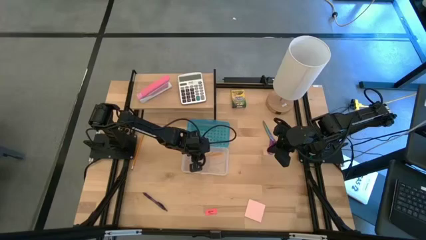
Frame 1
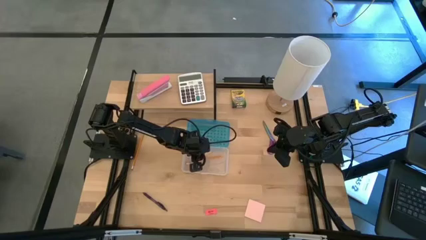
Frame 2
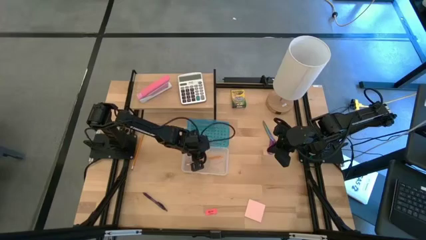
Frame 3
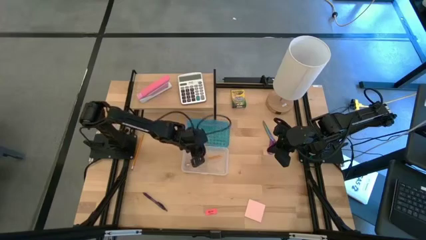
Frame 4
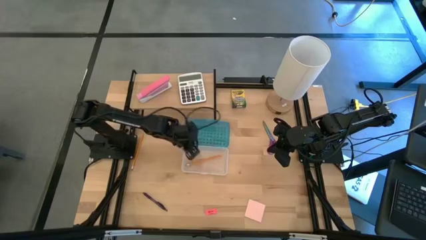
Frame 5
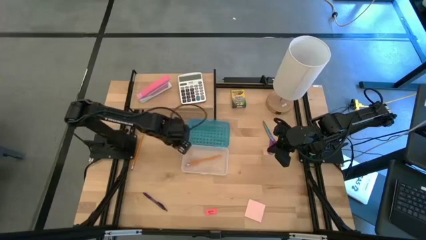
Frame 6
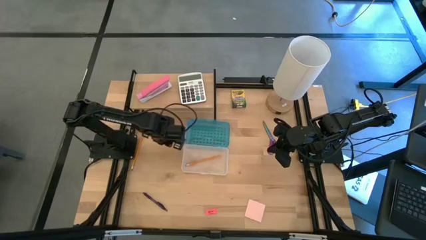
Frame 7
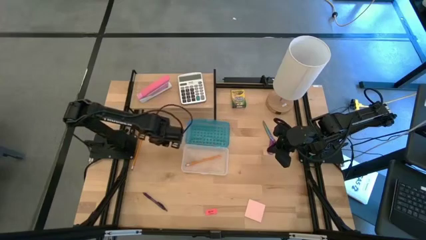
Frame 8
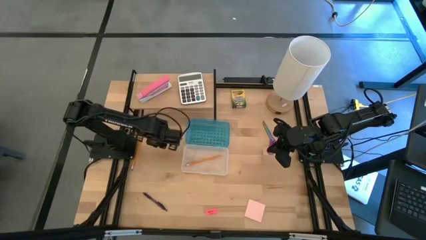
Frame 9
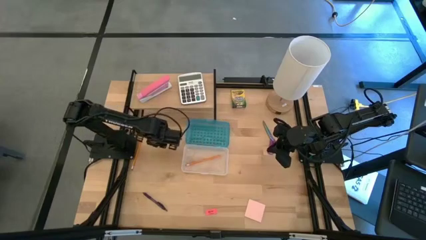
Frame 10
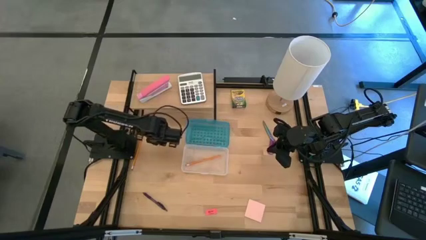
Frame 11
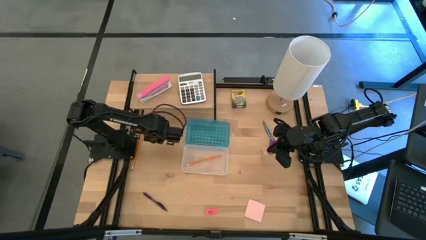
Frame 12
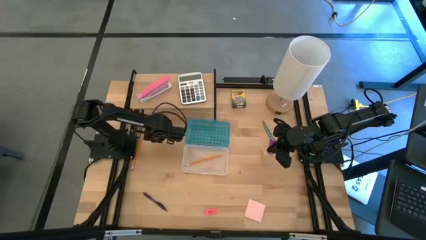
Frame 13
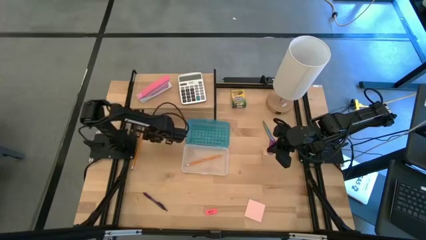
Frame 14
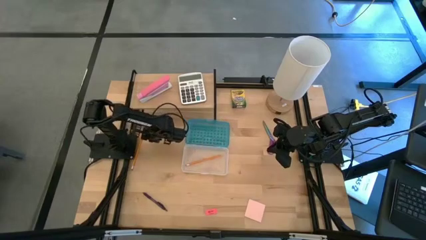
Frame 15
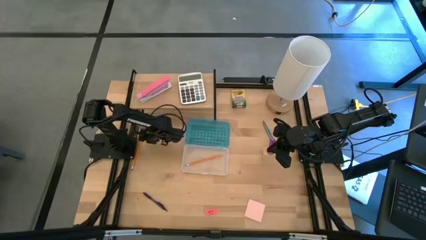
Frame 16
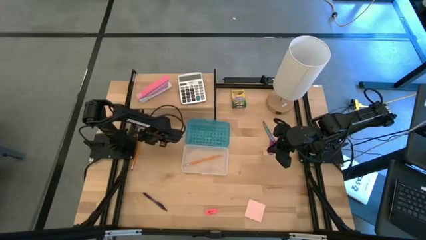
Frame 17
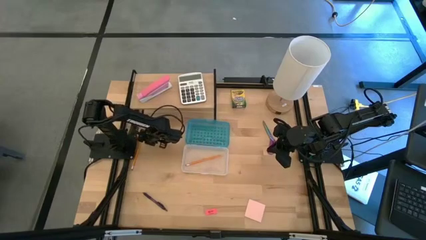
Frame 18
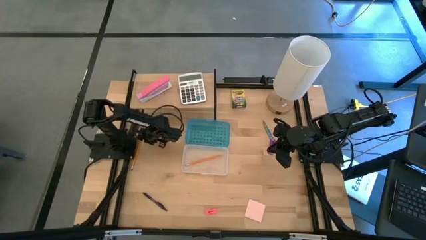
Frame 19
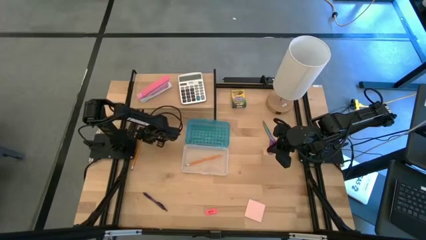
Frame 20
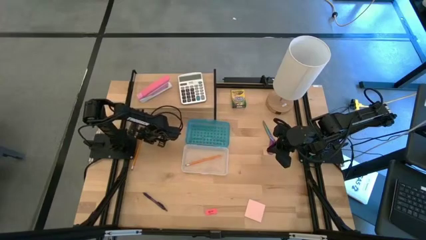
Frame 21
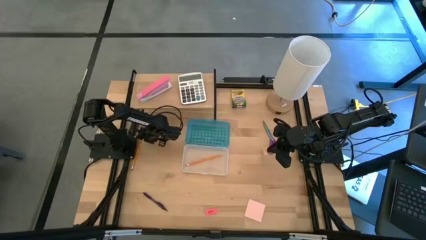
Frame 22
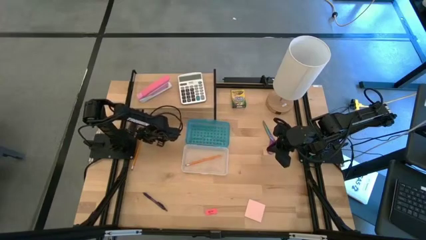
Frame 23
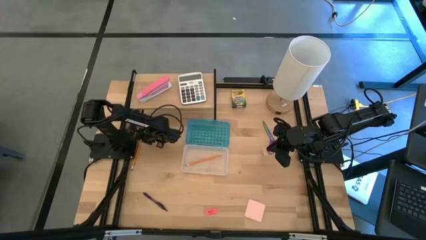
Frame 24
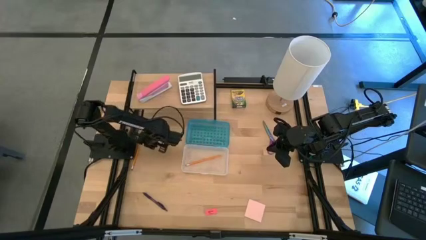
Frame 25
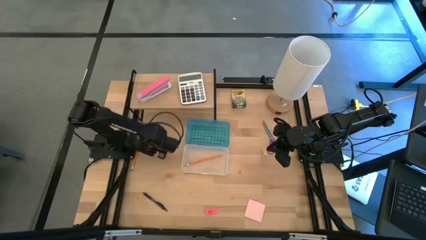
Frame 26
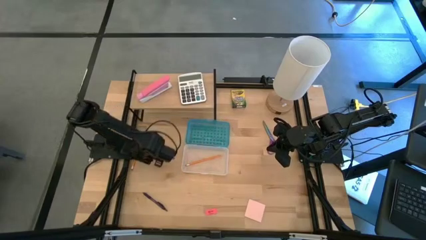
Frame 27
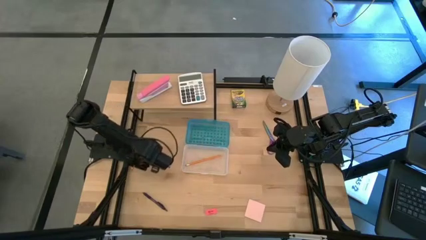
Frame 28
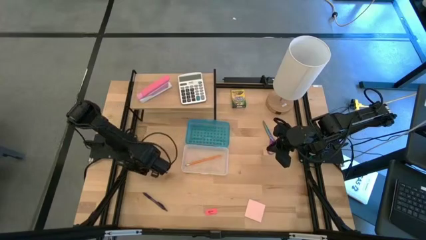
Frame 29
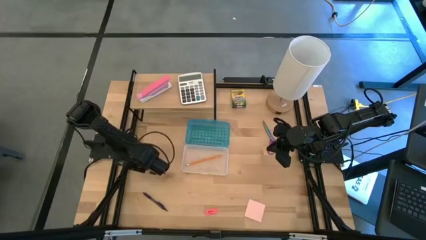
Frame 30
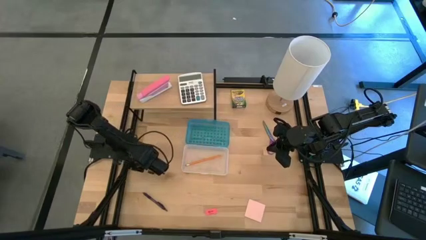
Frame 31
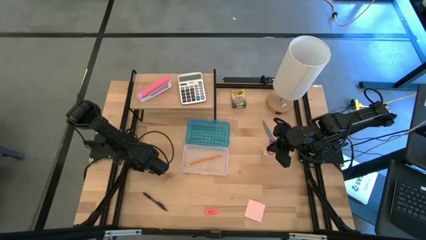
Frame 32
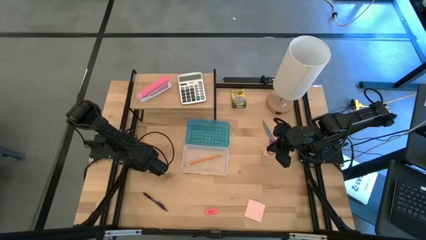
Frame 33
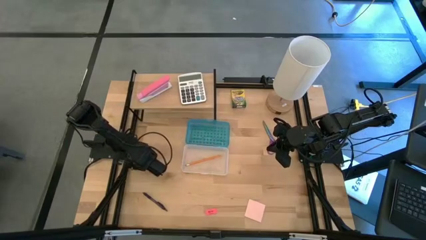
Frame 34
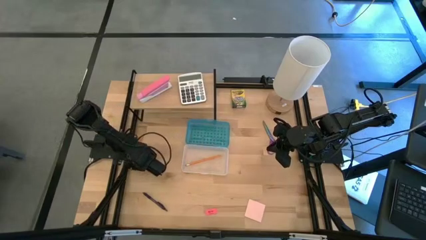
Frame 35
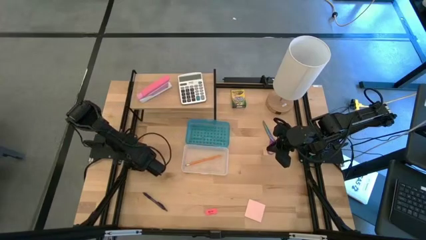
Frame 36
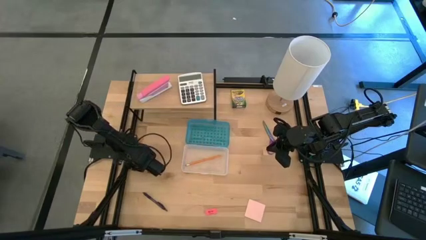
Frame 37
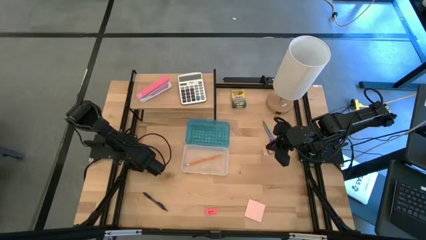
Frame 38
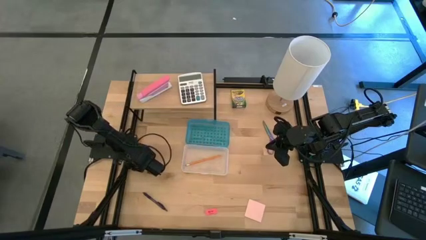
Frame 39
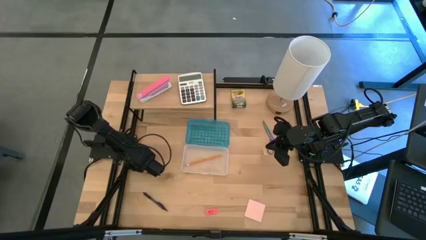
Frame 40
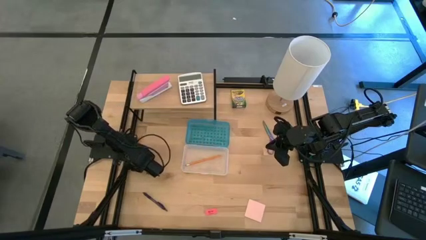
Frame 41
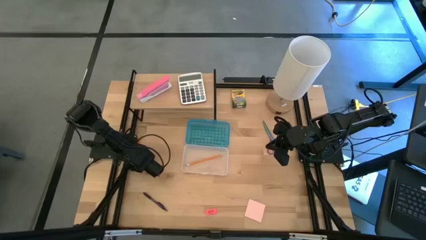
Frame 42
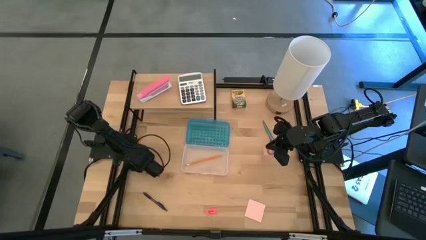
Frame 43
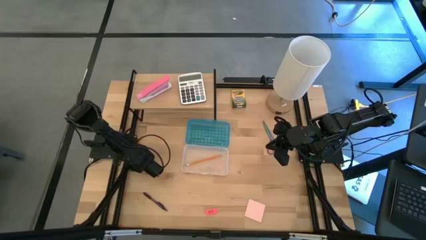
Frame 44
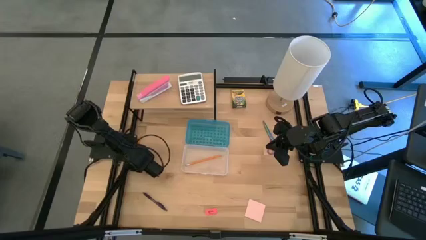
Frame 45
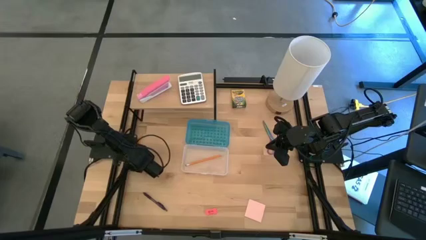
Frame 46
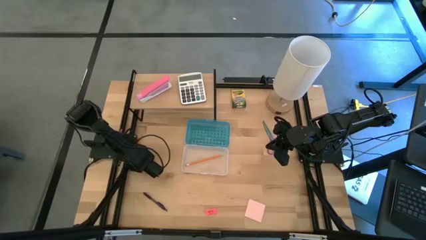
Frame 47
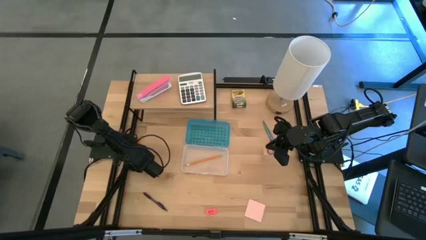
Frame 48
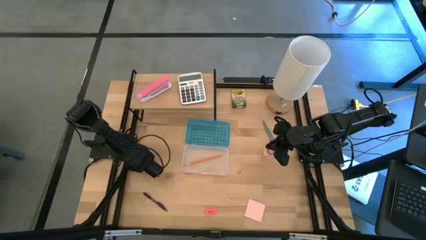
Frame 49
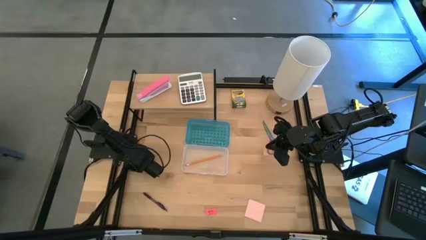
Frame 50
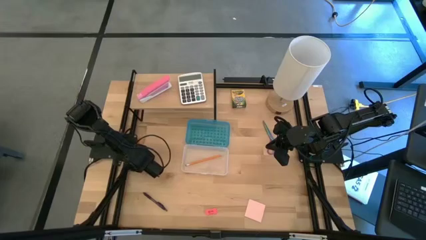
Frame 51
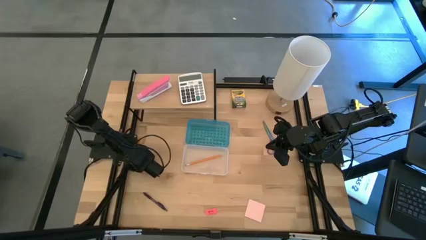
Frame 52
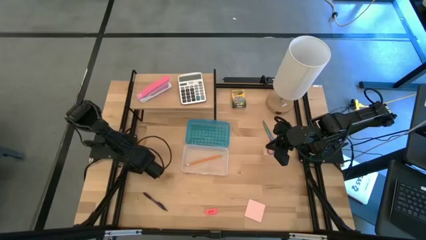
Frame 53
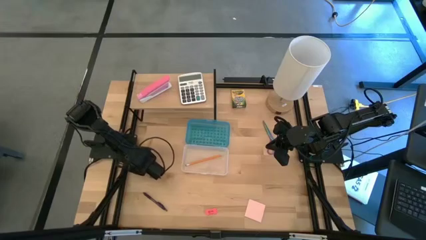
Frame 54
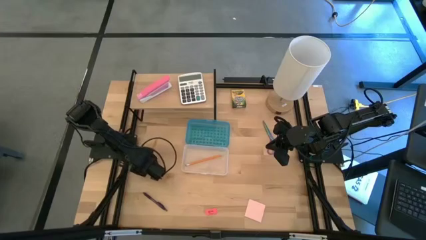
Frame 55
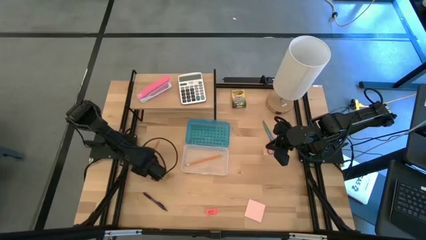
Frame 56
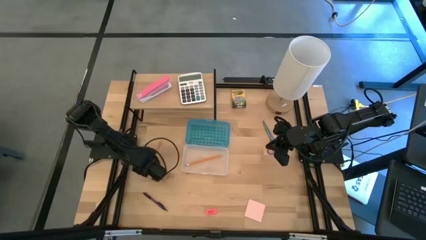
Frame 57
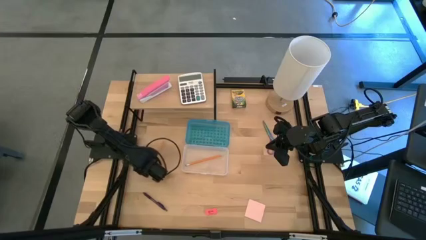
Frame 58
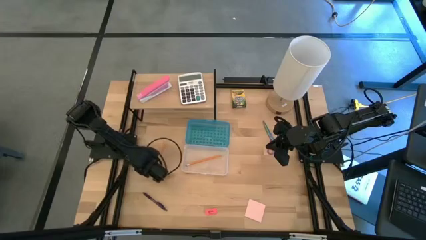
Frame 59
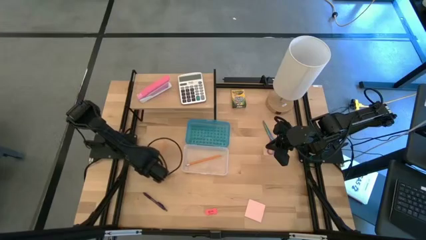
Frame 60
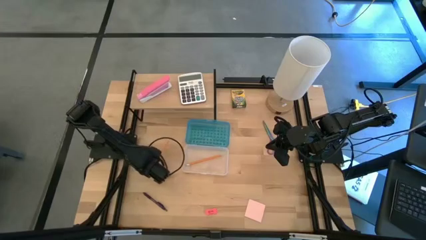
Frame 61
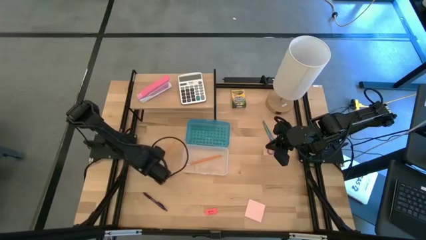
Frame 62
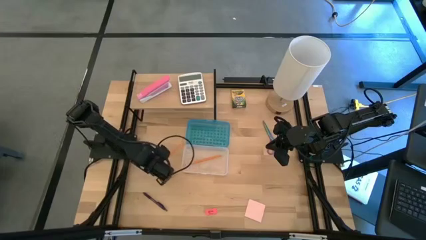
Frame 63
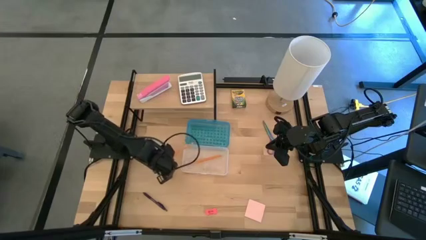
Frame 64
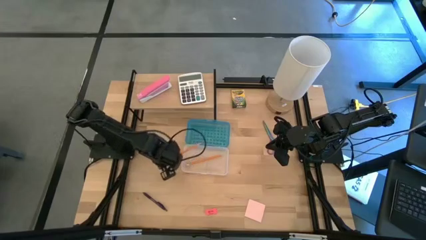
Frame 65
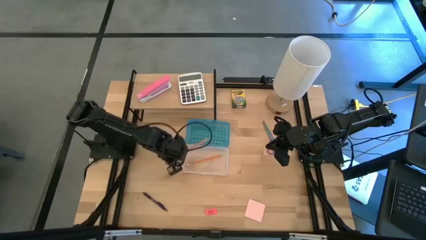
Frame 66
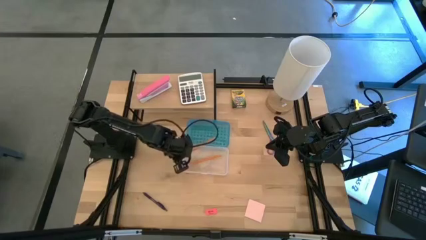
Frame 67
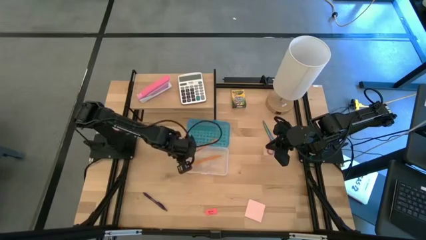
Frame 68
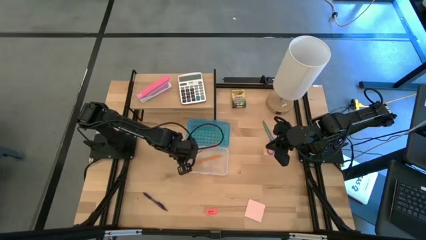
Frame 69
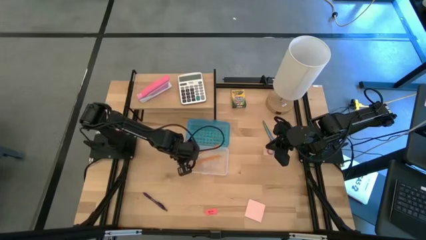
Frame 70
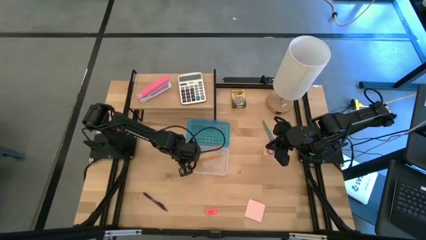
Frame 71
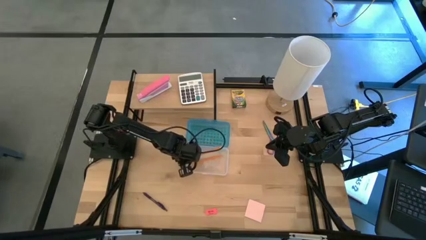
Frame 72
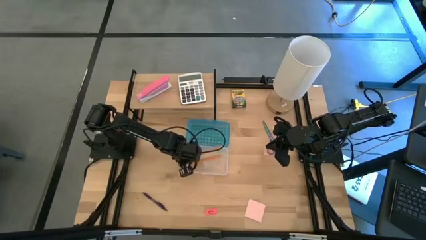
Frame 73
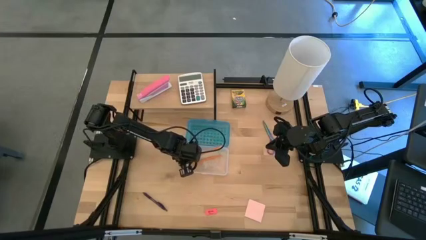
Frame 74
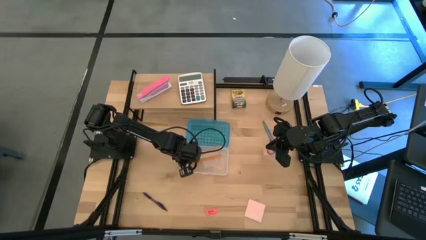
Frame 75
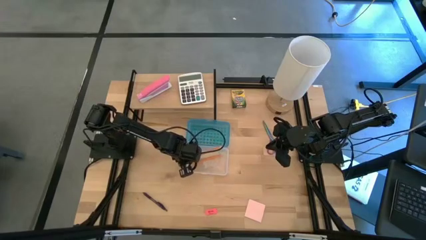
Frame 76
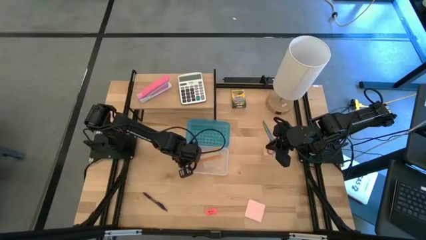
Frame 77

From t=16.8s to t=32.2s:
Task: Pack school essentials
Put the orange pencil into the blue supply box

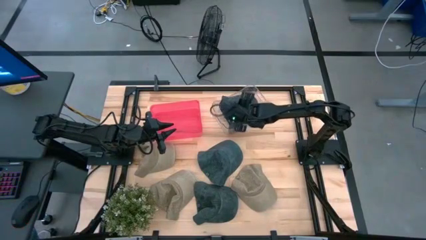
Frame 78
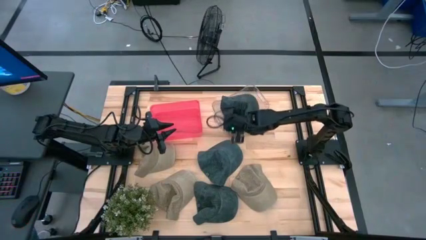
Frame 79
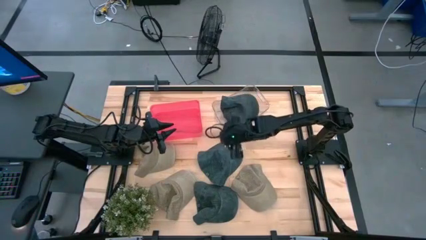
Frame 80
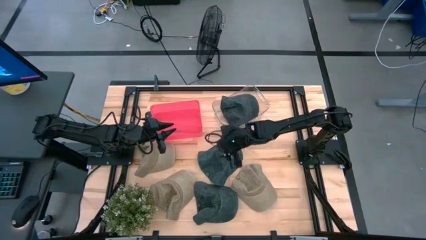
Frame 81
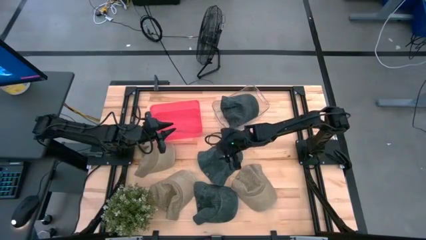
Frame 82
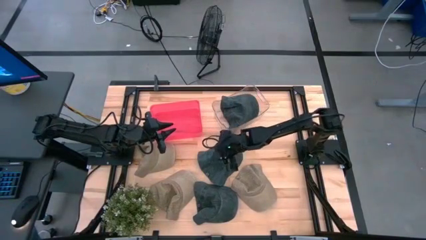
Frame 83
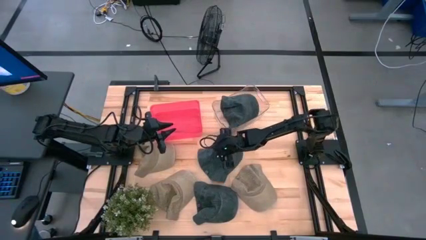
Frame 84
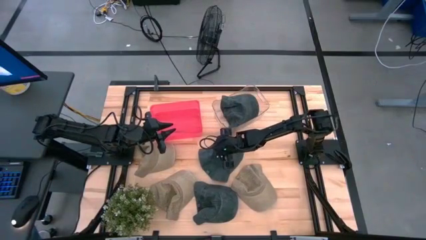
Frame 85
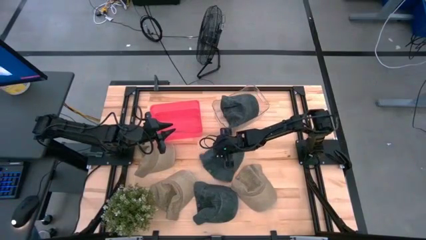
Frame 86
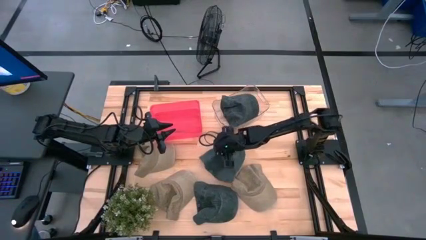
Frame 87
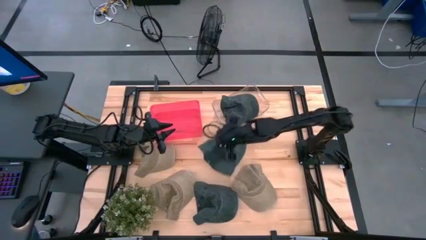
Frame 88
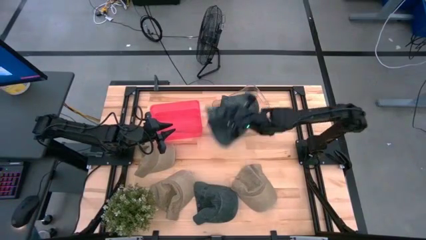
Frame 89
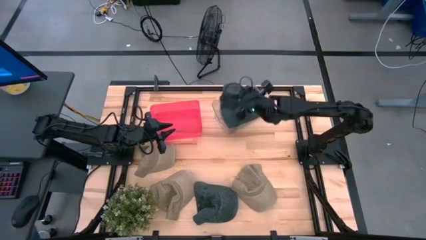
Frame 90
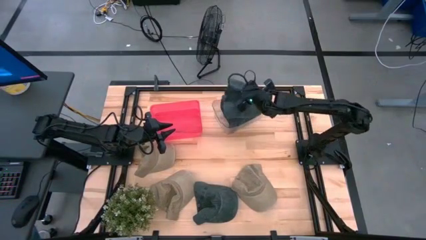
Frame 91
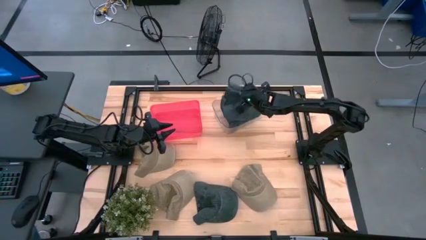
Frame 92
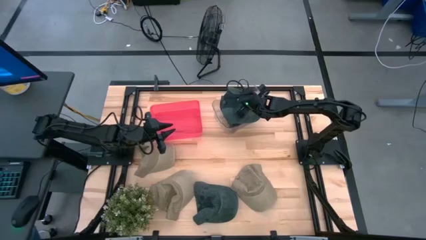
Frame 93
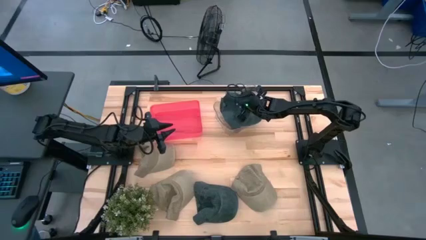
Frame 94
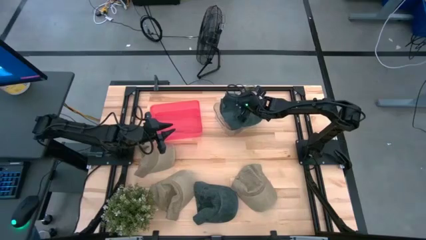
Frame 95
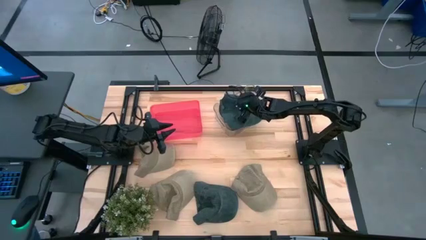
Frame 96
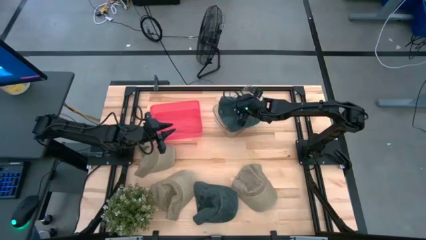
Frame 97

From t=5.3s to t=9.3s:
Task: Pick & Place hat
Put the top blue cap into the transparent bin
